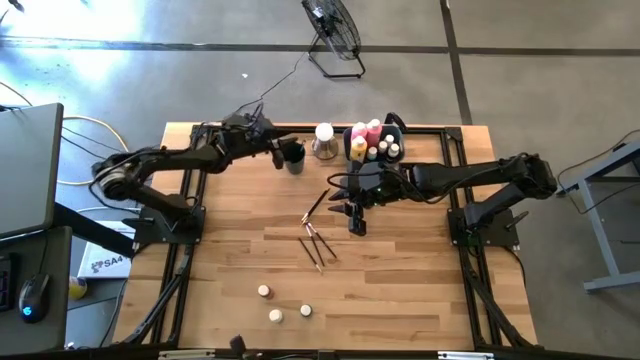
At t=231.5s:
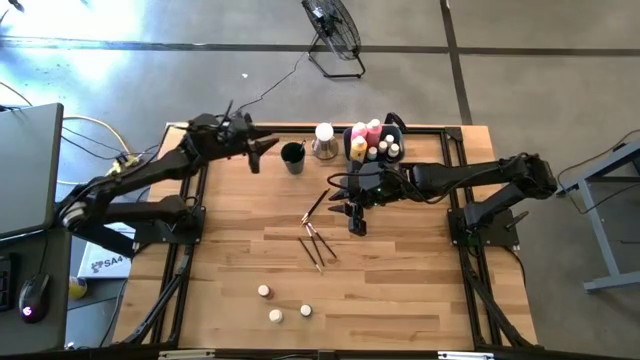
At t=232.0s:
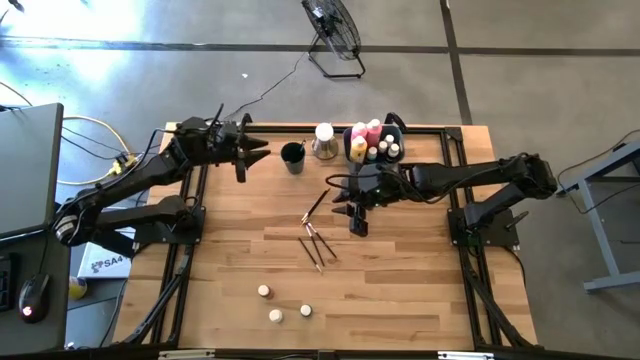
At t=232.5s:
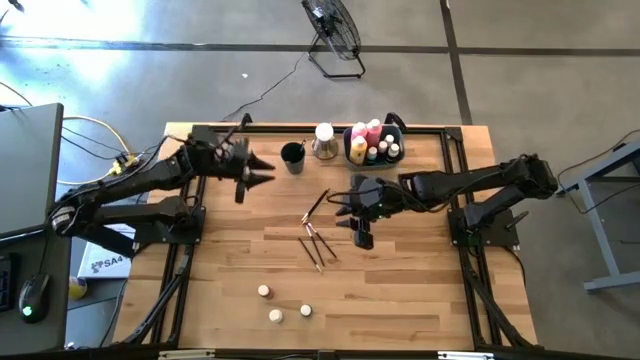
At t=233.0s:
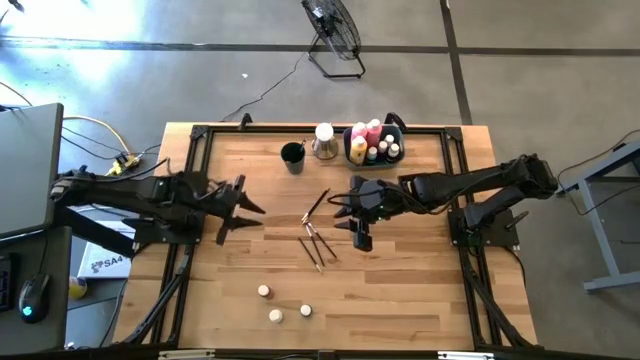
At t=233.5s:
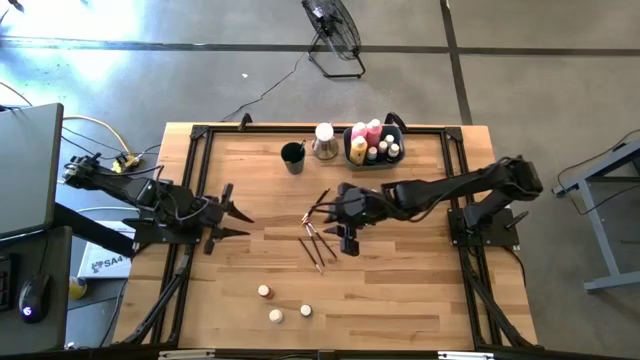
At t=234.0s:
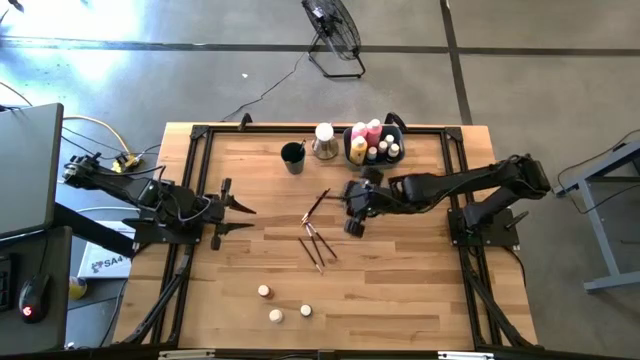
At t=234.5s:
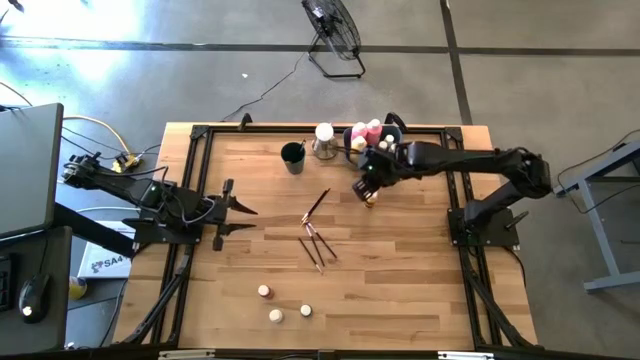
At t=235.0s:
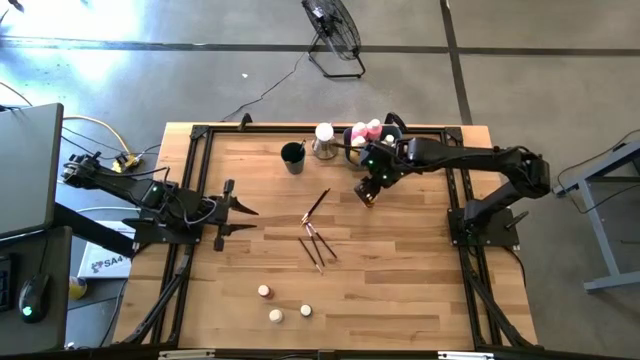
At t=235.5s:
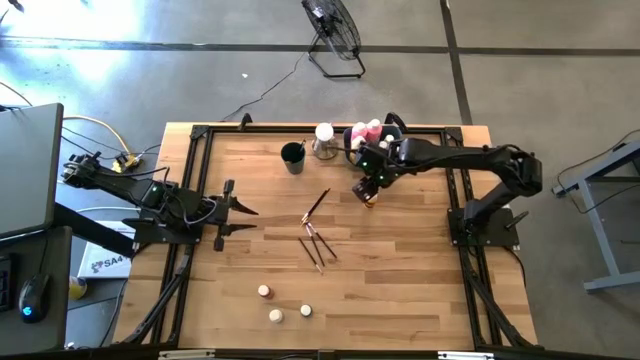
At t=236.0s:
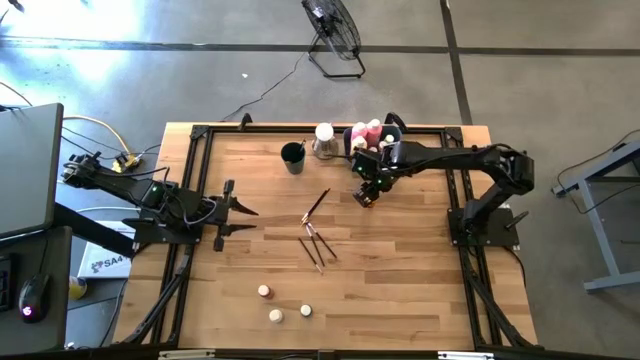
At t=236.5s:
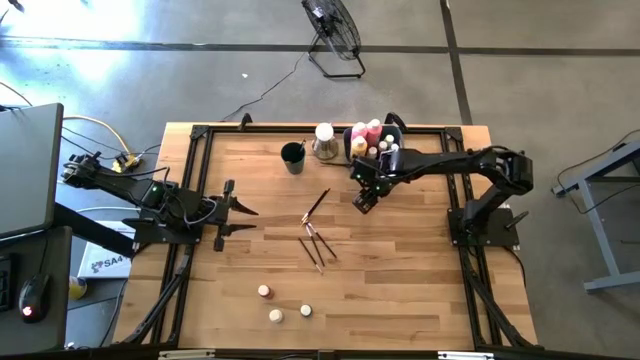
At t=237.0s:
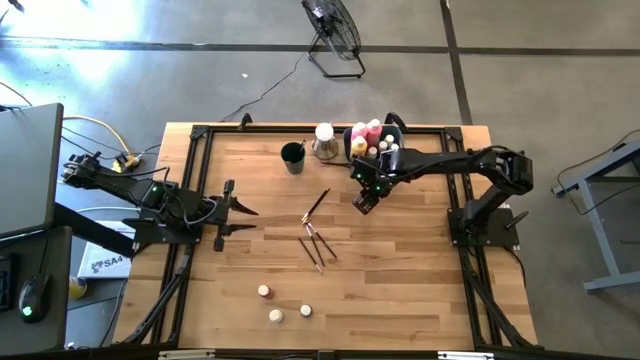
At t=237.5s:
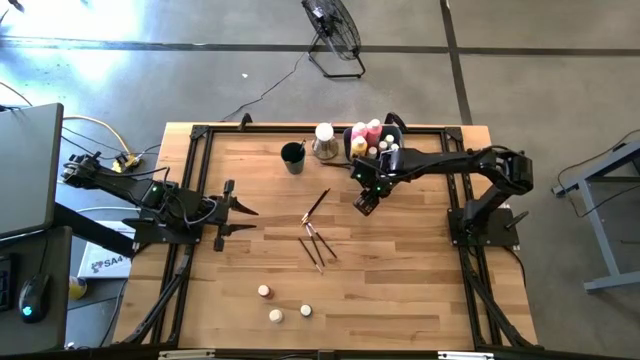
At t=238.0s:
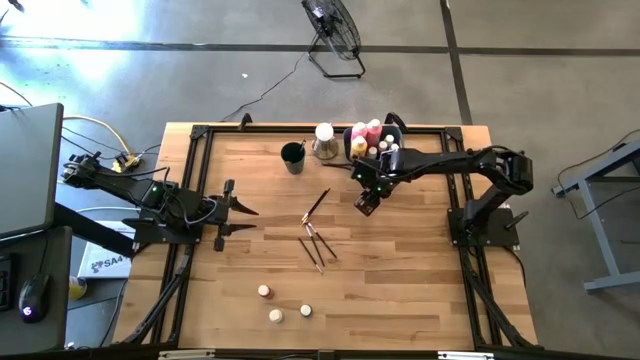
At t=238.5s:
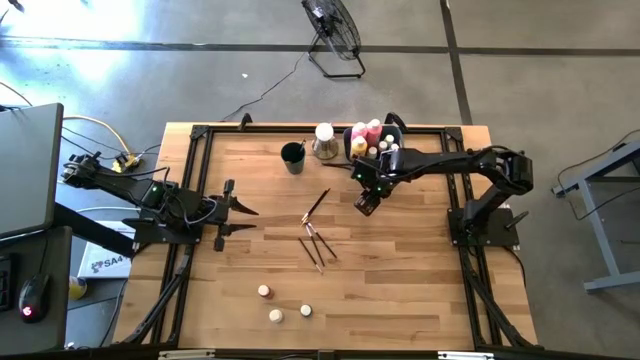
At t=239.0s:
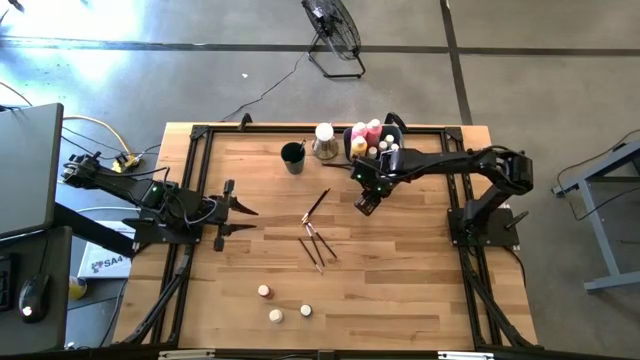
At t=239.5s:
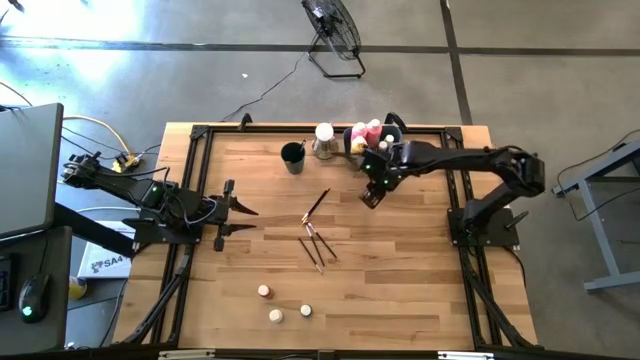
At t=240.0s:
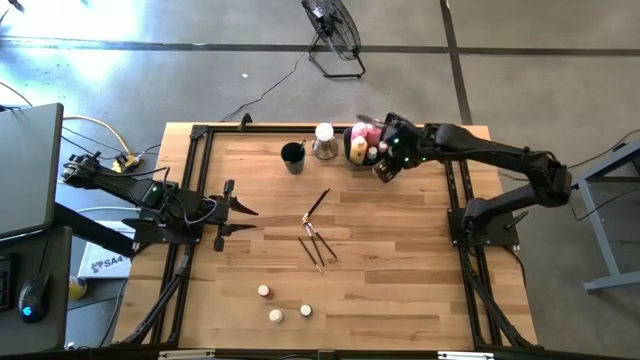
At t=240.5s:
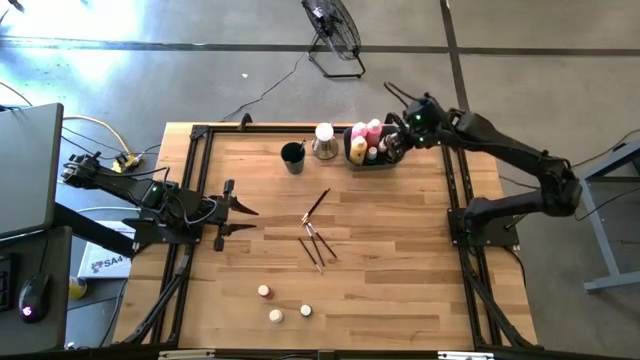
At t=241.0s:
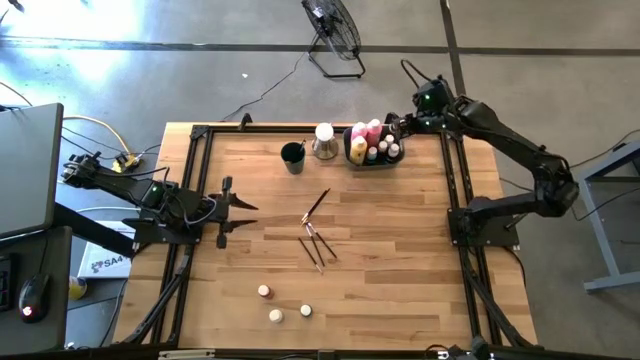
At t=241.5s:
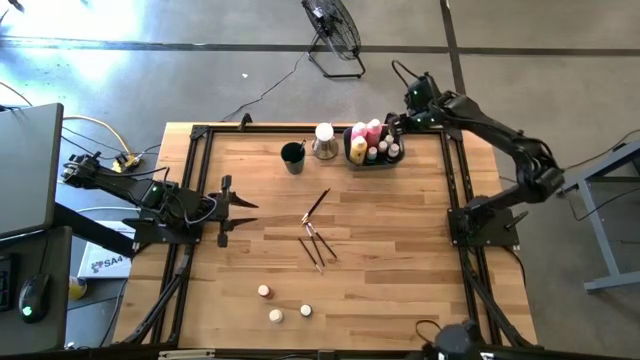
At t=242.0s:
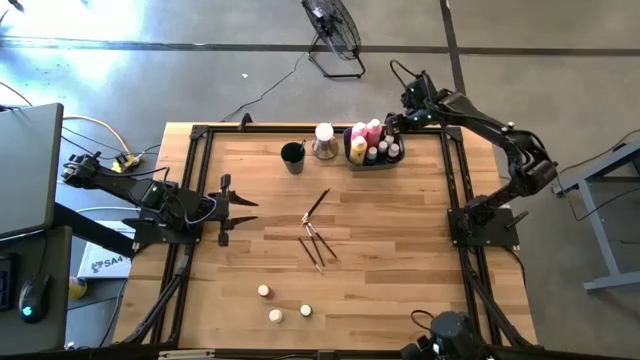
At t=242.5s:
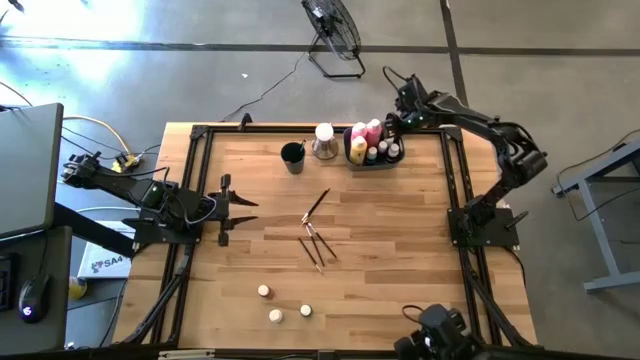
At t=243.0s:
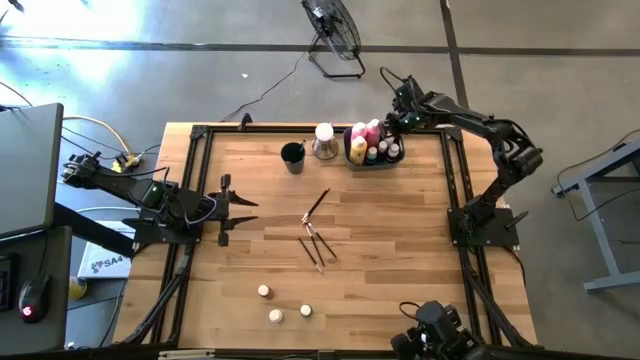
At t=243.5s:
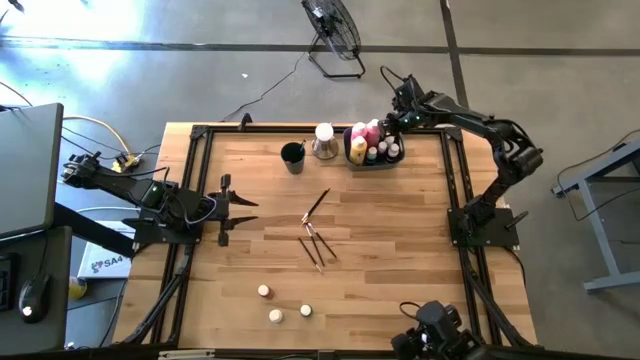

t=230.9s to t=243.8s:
Task: Pick & Place Paint Supplies
Put the small yellow paint bottle into the blue bin
